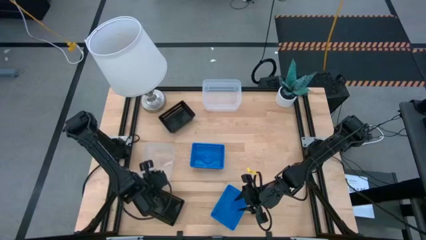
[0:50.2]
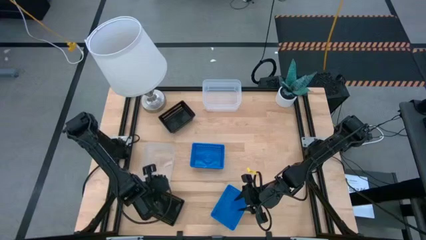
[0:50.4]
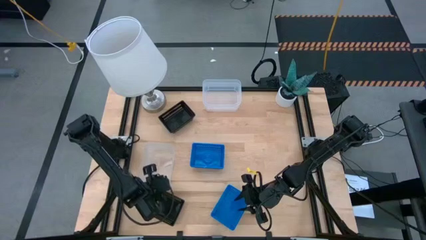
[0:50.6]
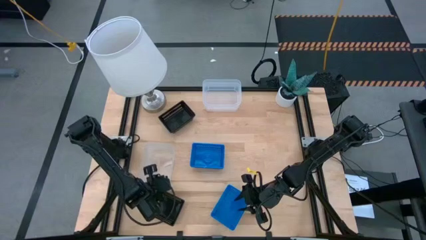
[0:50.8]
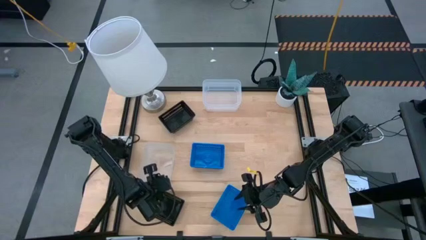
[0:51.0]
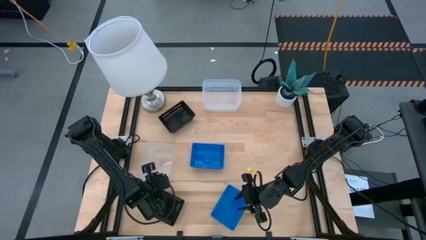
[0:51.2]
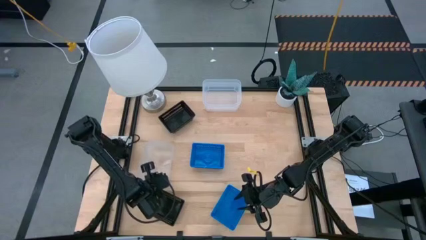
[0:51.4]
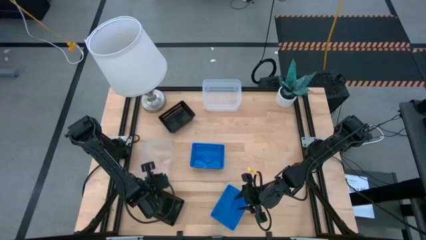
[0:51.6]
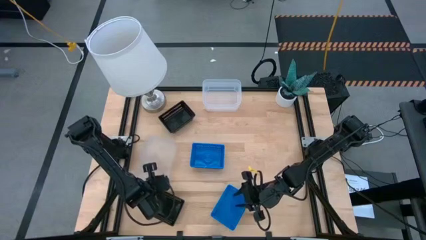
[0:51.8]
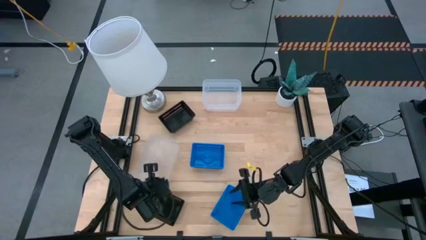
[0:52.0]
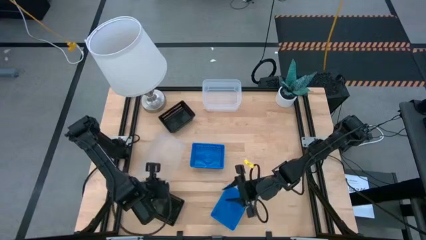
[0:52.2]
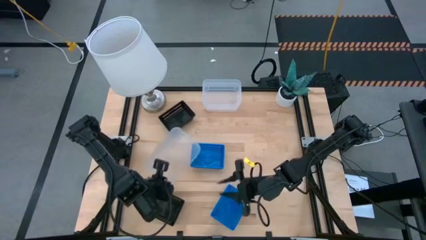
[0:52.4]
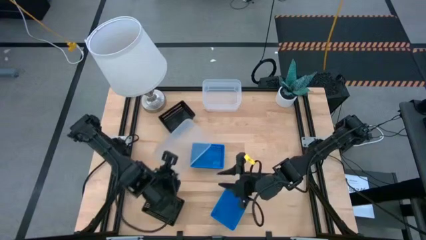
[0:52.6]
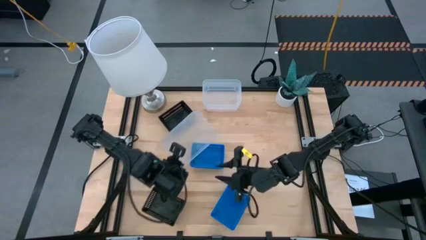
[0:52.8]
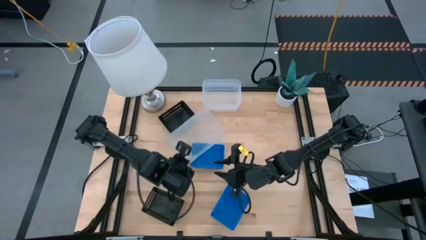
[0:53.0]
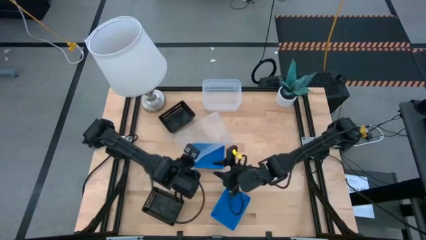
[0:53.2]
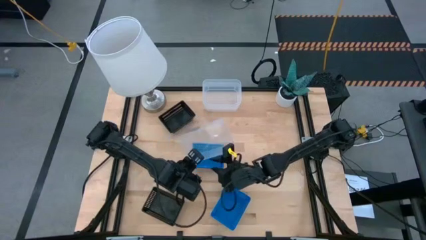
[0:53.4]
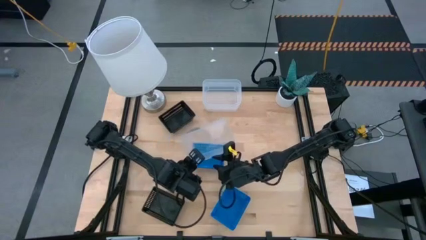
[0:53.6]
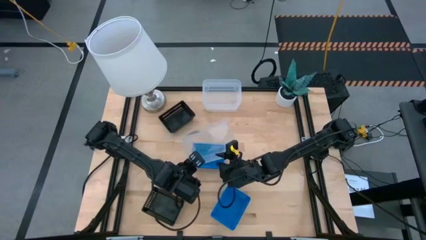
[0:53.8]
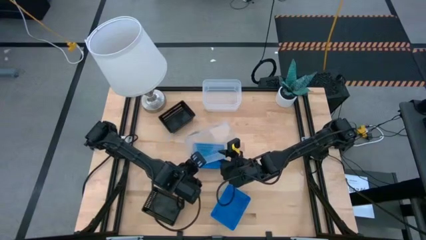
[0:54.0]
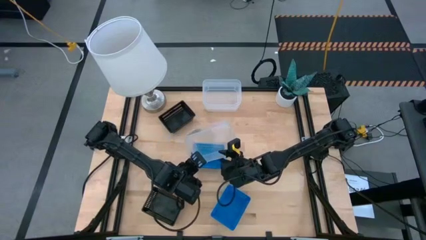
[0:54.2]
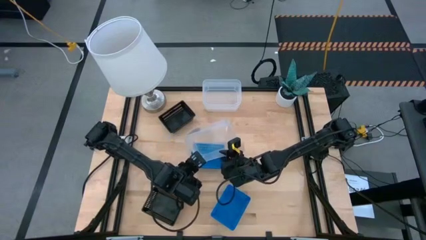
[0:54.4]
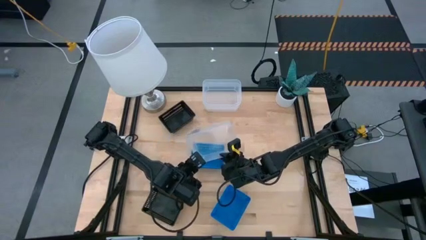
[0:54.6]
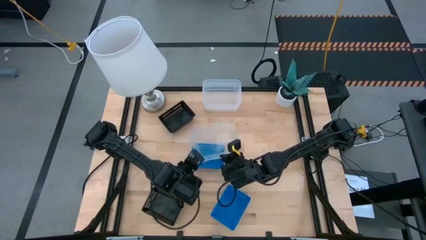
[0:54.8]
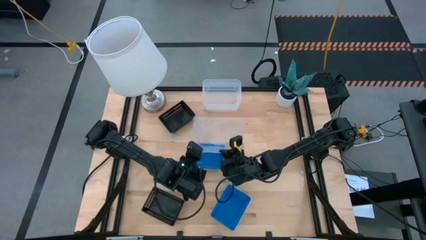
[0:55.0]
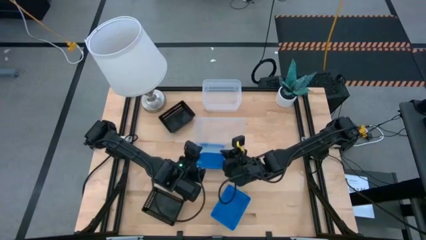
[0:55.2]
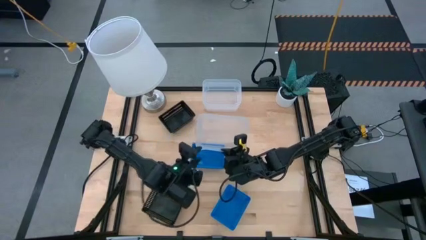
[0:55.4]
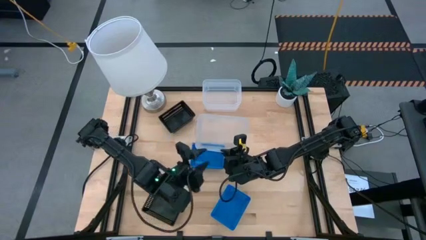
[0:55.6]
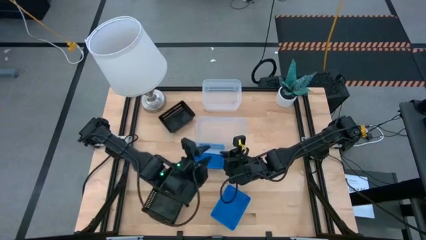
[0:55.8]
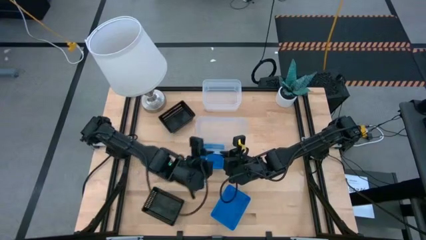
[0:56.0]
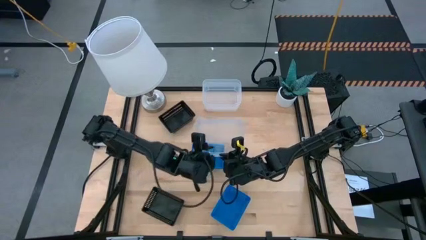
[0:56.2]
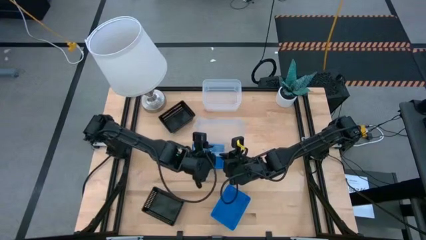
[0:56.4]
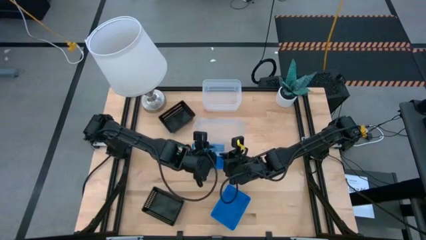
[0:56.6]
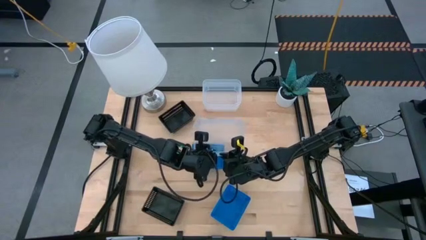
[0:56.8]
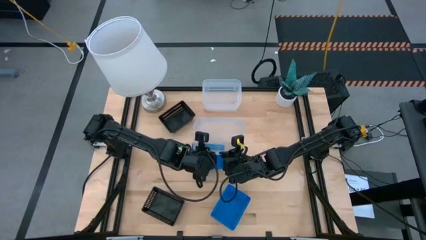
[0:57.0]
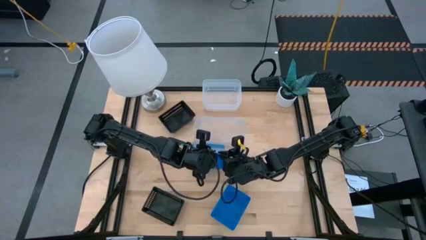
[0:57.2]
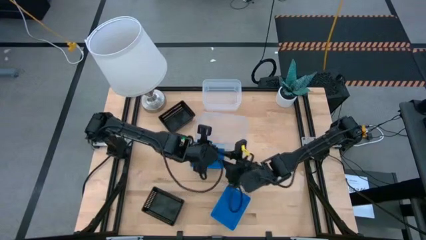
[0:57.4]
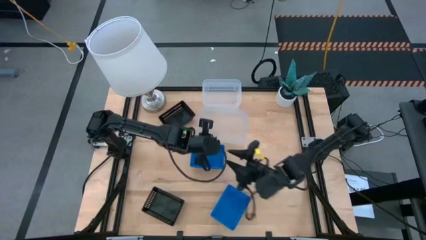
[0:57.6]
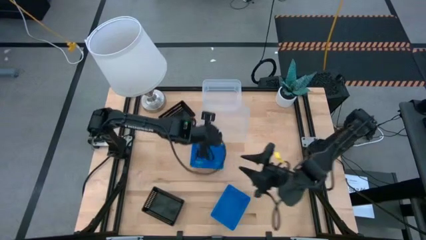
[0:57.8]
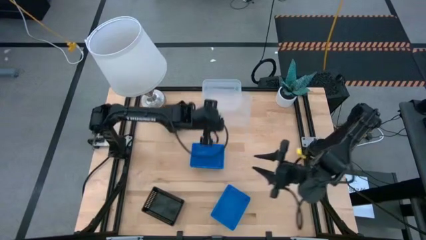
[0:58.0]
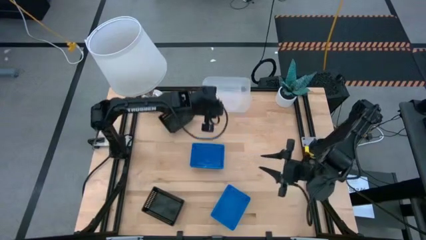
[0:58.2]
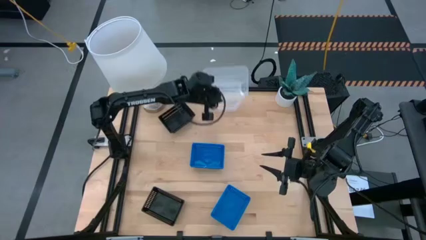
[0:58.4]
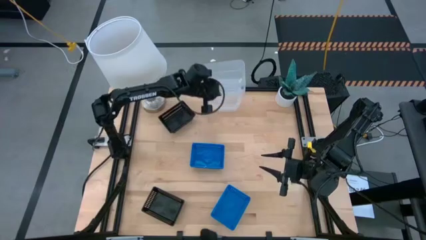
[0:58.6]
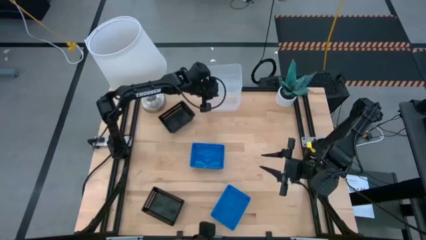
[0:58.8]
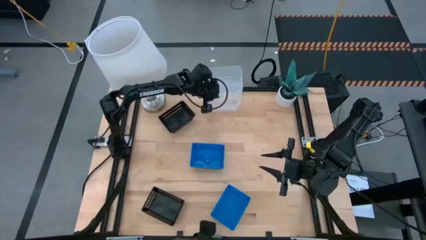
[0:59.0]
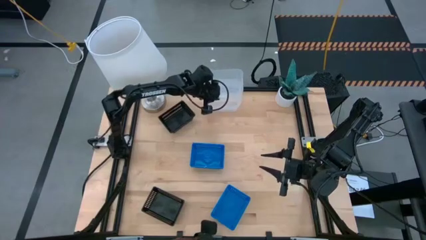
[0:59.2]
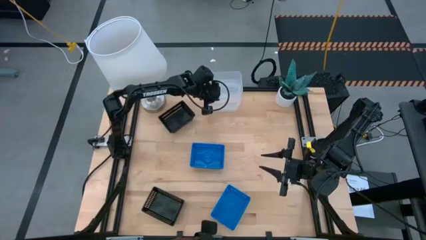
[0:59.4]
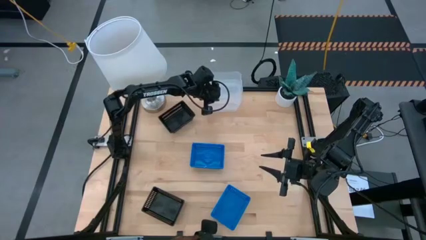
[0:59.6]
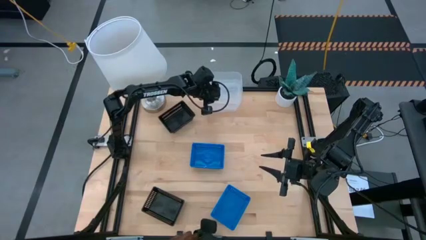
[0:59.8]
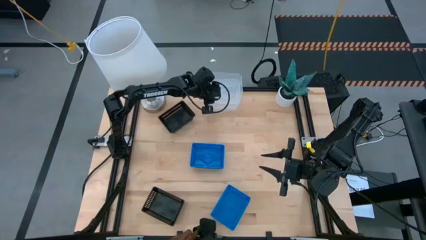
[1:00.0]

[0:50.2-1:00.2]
Stack the bottom transparent bin on the top transparent bin

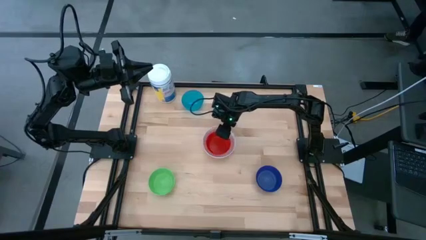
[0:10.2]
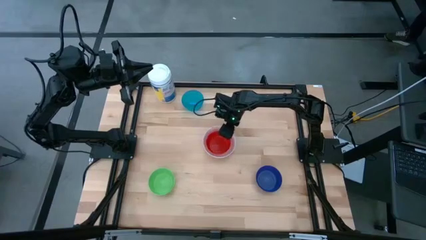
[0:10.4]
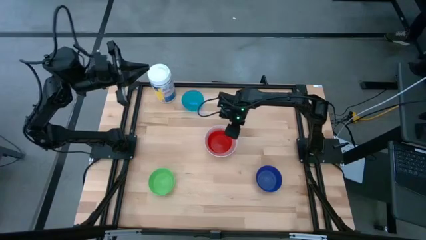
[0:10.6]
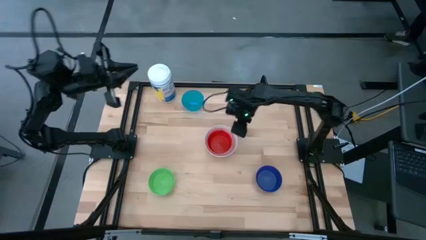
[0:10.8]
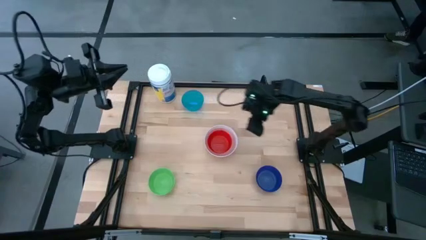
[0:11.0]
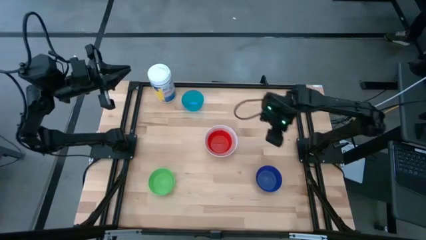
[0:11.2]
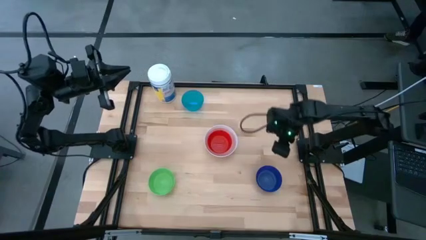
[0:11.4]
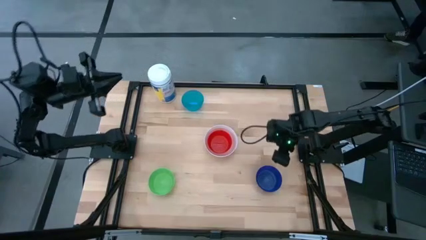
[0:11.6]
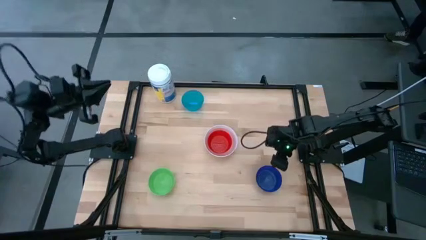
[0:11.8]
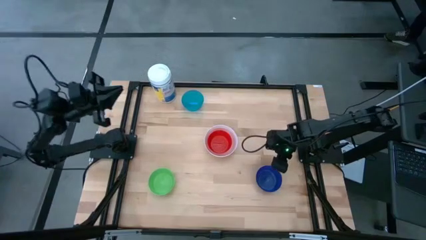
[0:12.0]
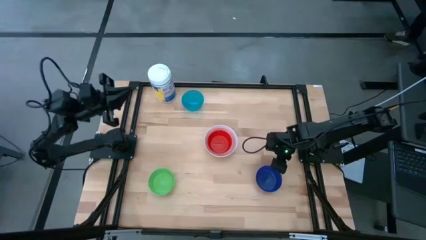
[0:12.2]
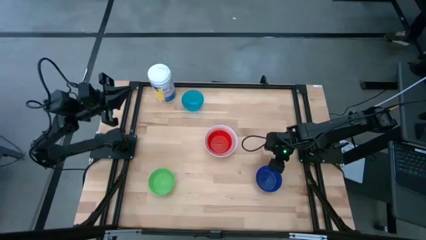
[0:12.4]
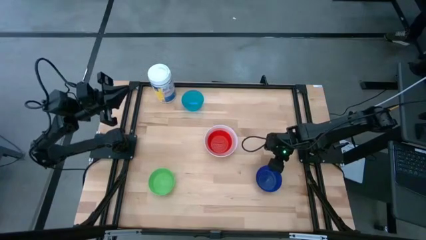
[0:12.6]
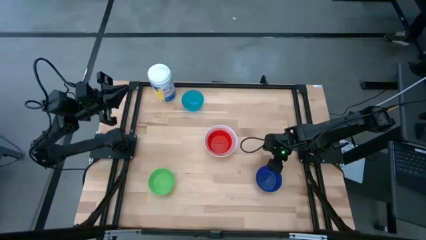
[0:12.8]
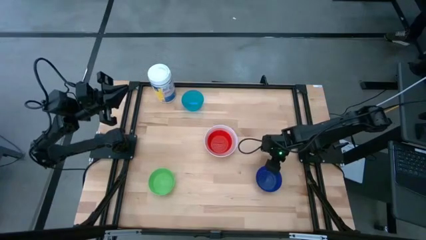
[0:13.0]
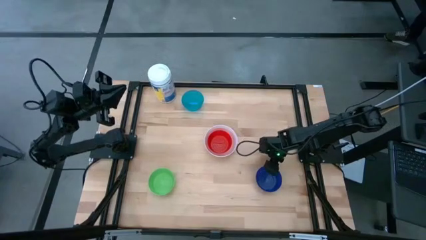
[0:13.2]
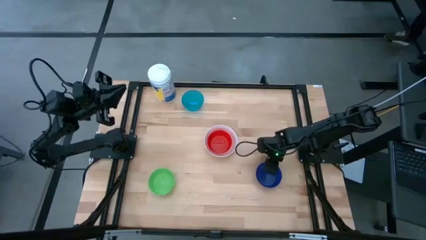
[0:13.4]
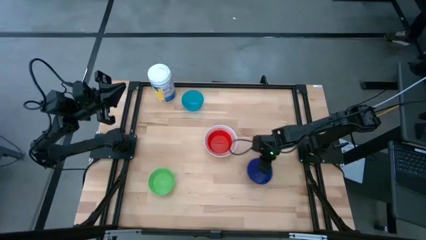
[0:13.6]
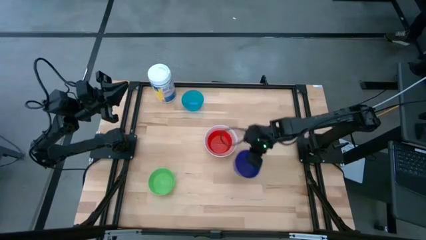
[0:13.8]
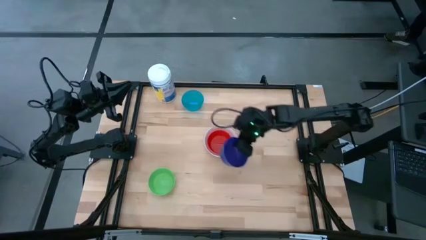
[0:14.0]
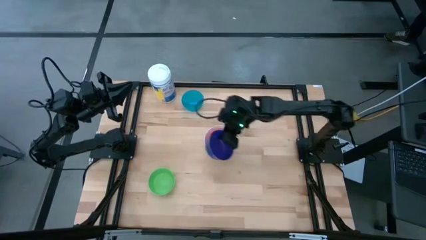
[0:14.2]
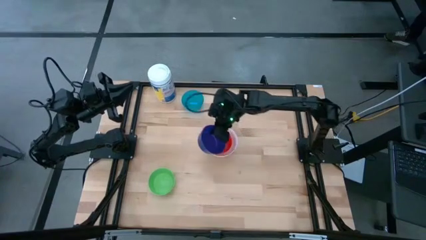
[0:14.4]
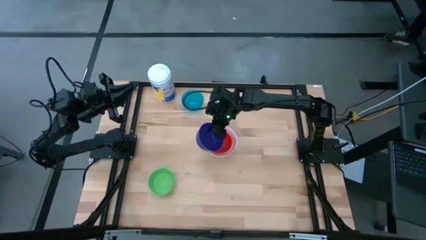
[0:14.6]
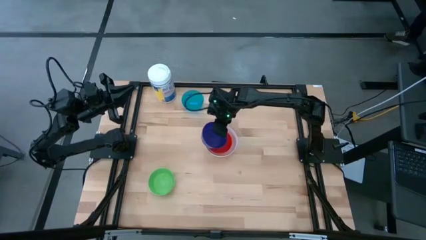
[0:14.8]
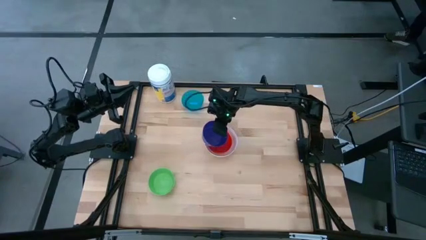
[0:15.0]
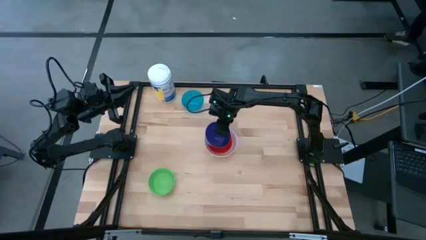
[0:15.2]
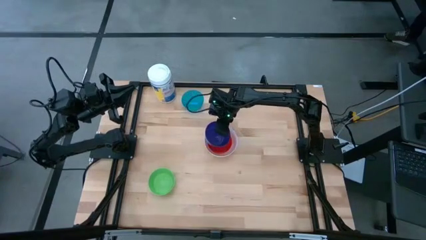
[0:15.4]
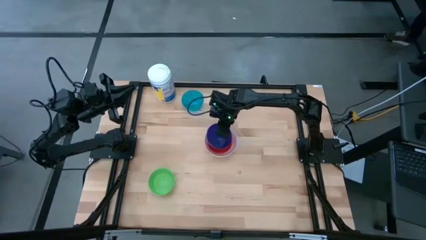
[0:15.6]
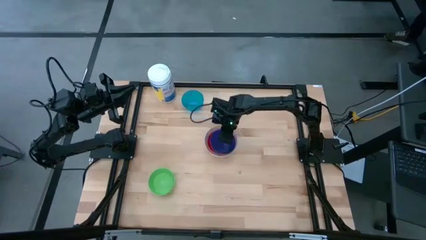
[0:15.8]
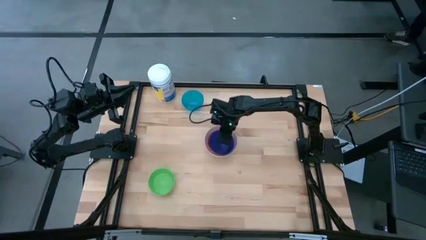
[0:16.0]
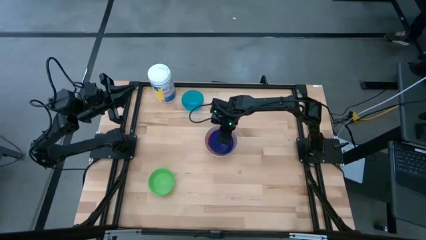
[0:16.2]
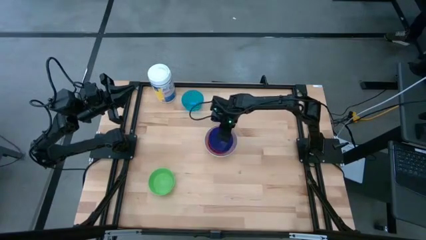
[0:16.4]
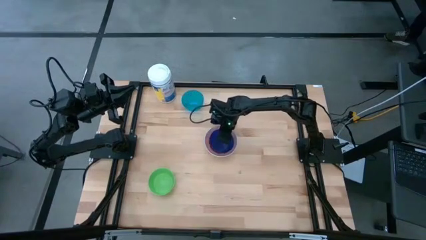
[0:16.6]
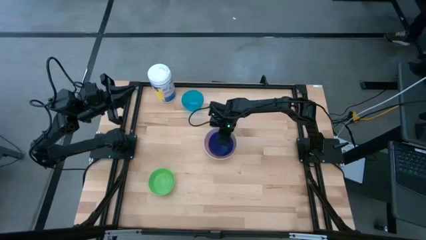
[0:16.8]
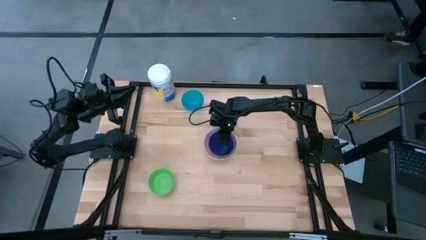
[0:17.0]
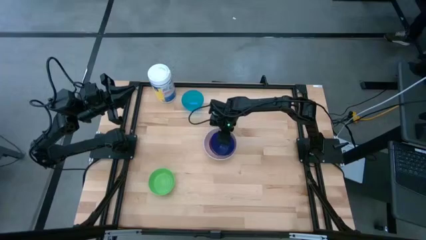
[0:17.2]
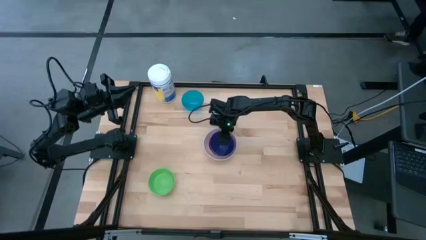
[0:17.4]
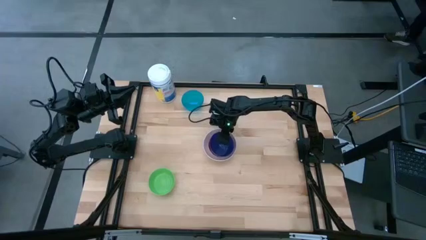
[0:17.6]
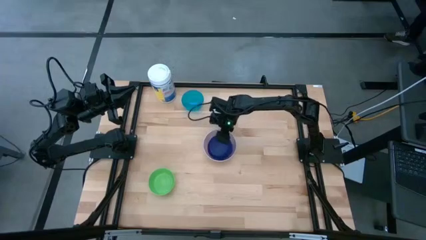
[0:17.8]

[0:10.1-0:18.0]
Stack the blue bowl in the red bowl
